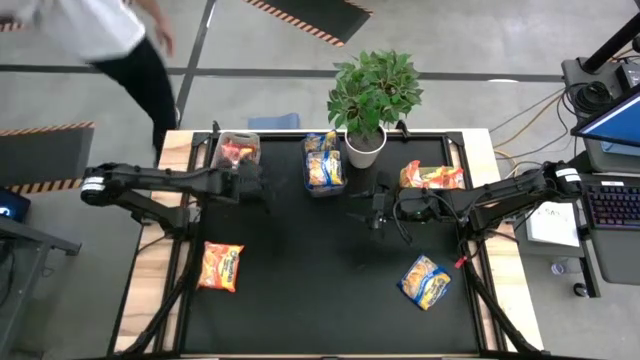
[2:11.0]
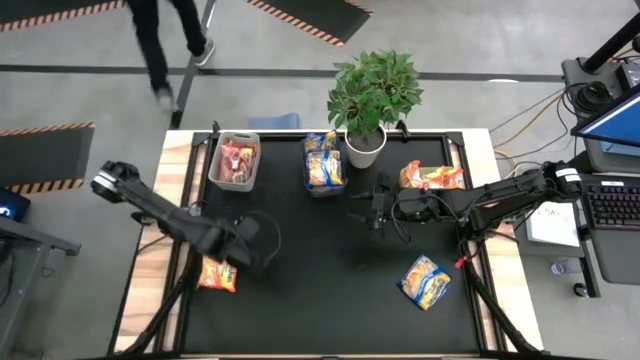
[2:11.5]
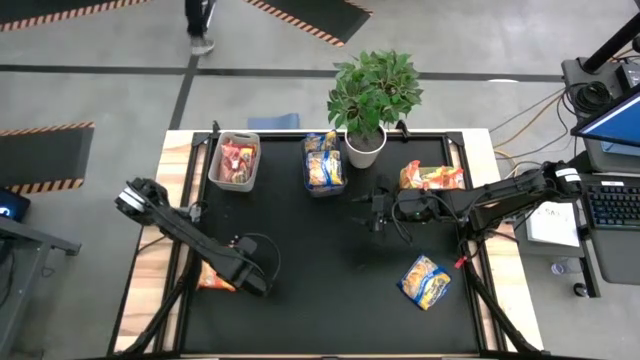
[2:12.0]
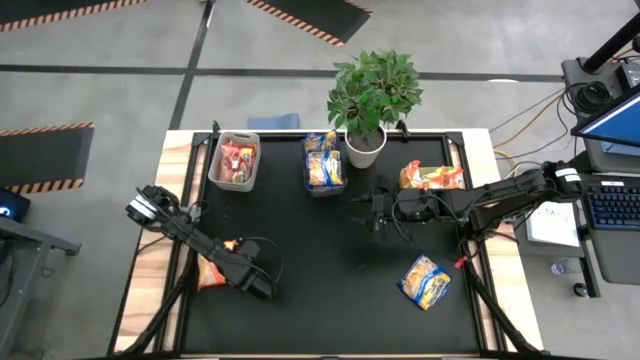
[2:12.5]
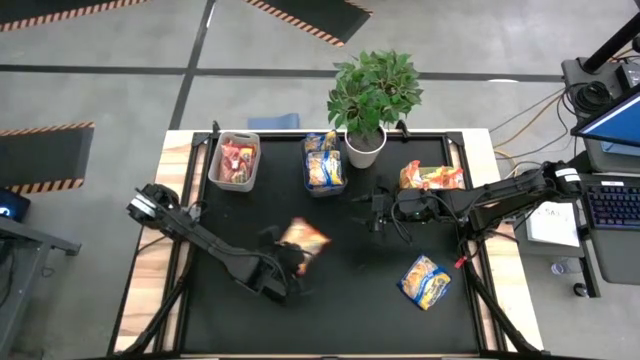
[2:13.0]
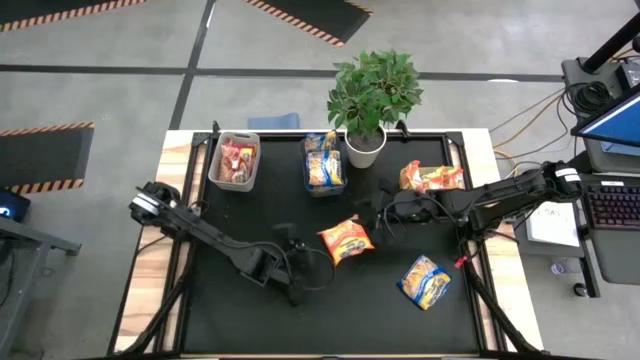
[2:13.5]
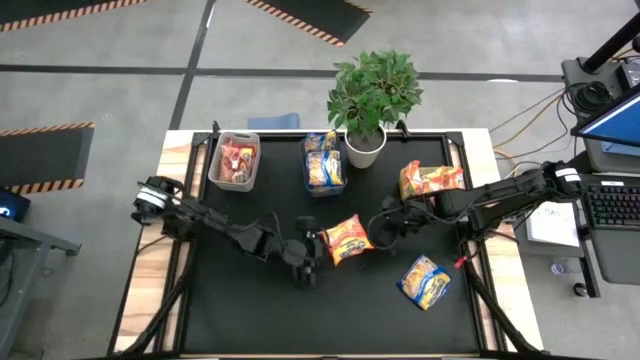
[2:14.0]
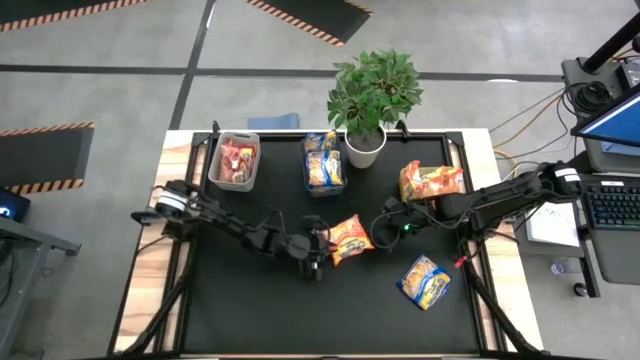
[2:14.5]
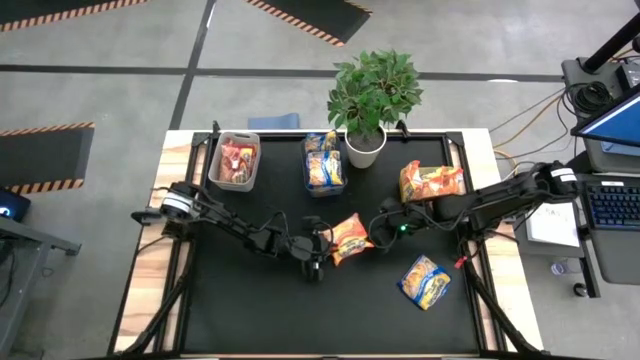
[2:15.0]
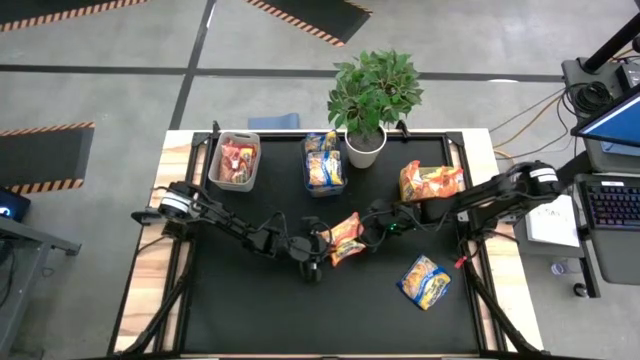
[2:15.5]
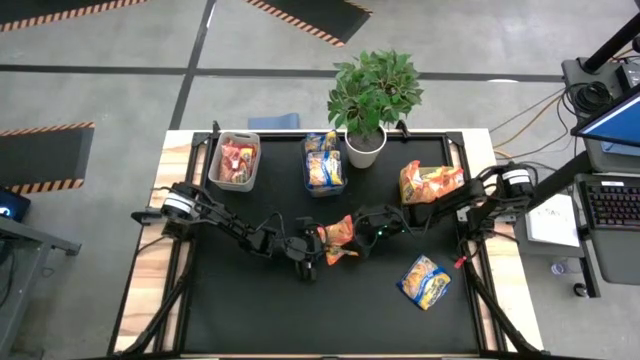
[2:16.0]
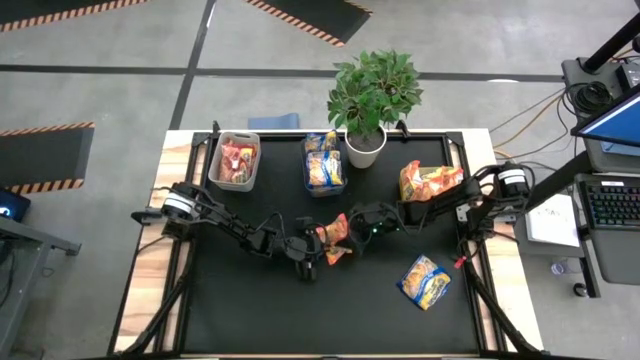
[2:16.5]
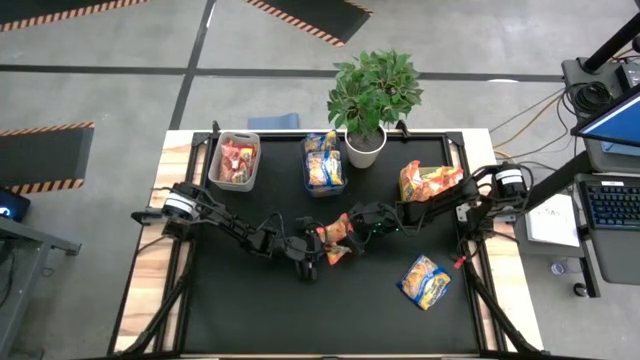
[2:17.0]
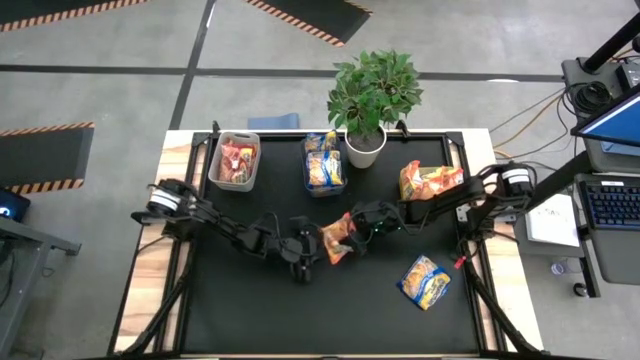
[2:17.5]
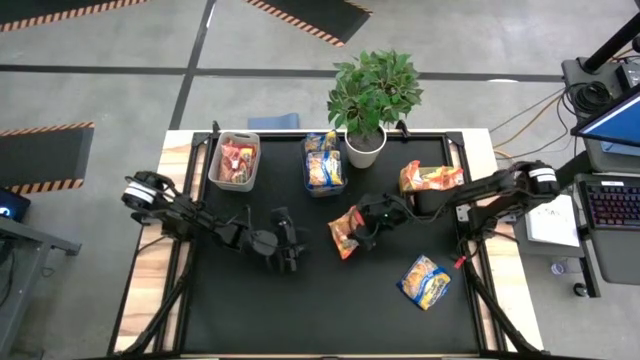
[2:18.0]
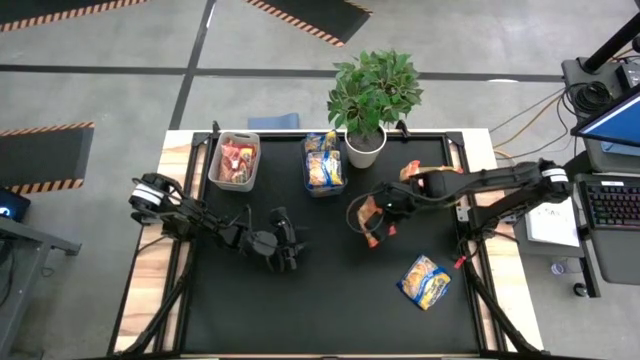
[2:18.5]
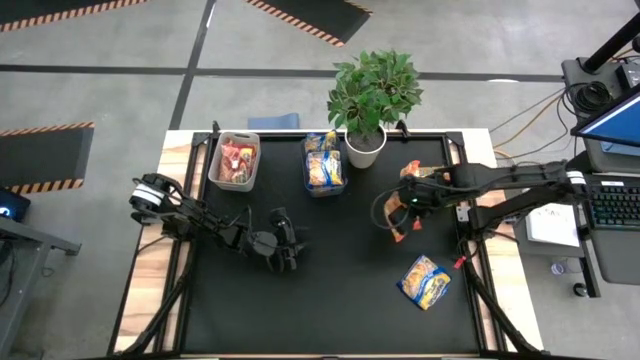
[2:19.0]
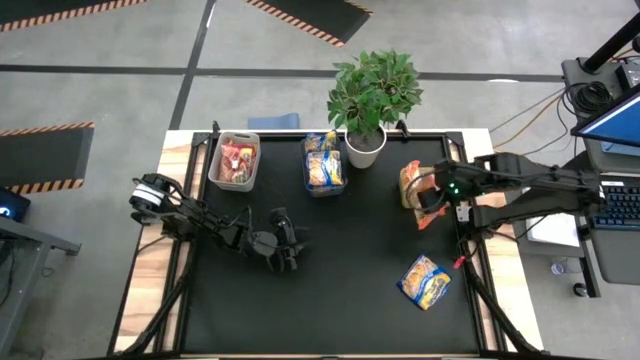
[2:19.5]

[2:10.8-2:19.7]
Task: Sort Maruchan noodles
Put the orange noodle pack into the yellow bin

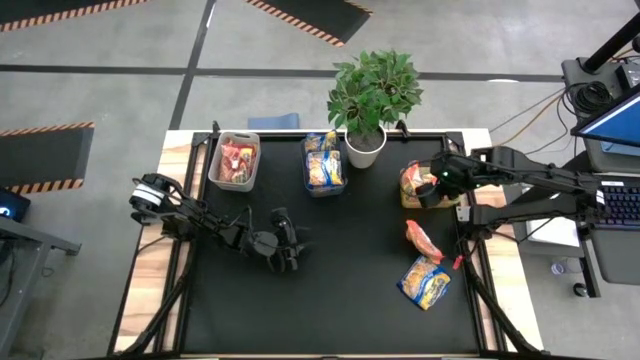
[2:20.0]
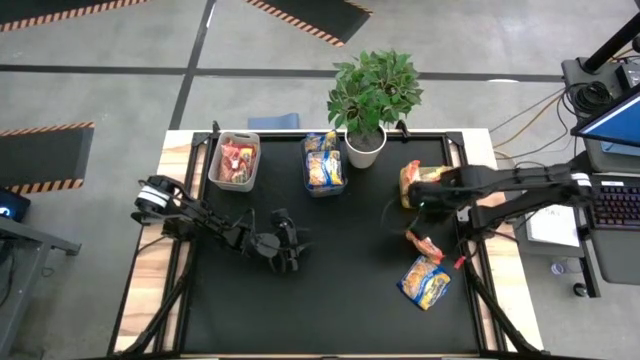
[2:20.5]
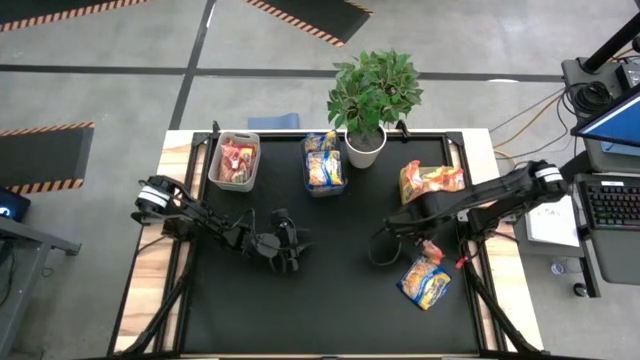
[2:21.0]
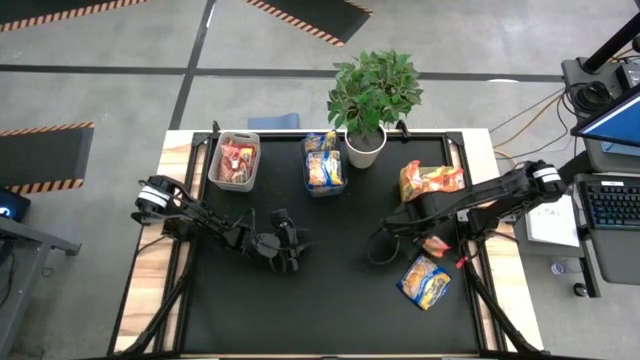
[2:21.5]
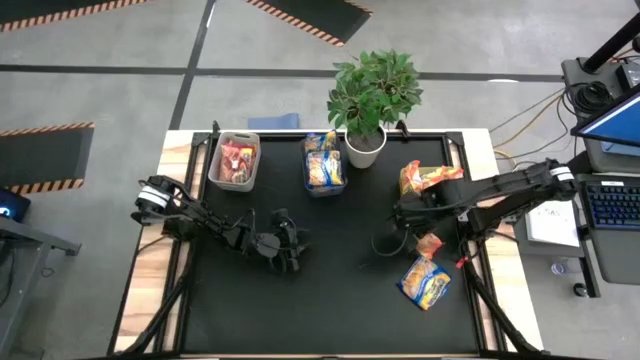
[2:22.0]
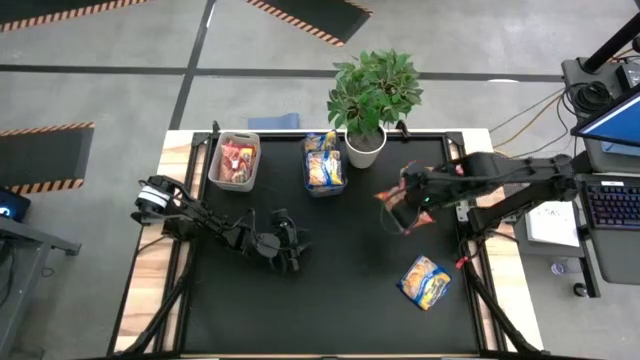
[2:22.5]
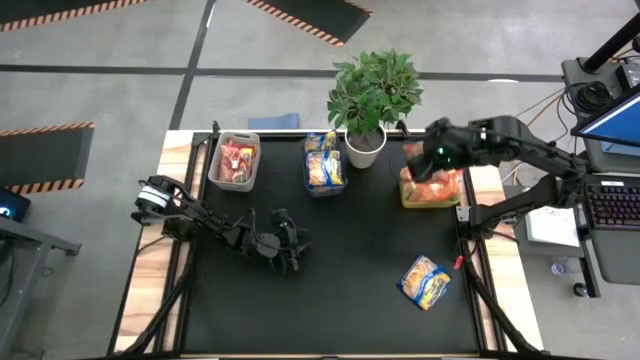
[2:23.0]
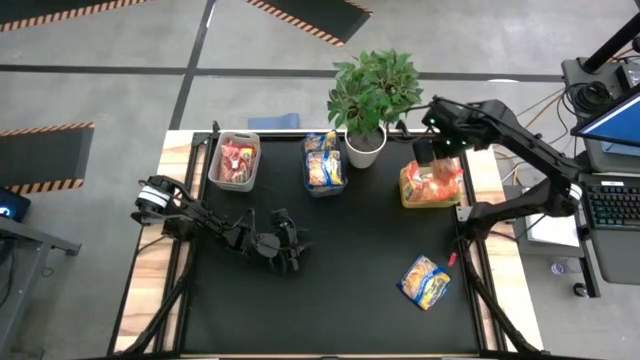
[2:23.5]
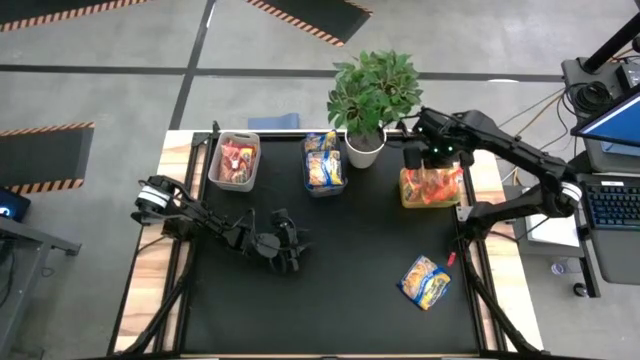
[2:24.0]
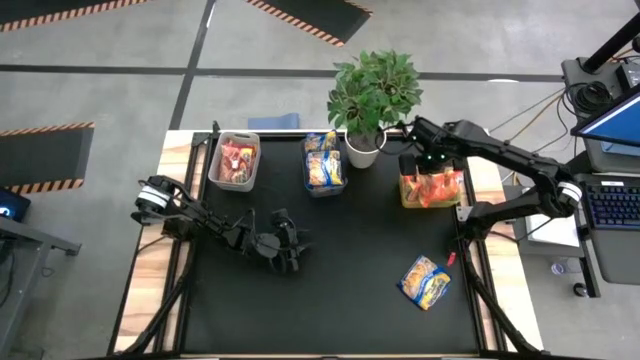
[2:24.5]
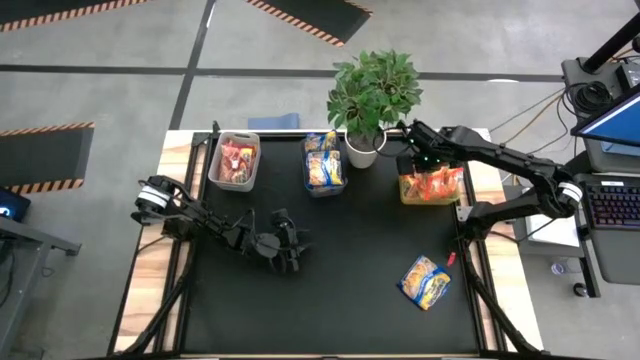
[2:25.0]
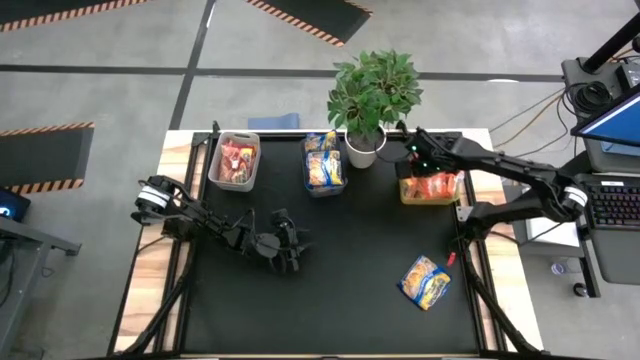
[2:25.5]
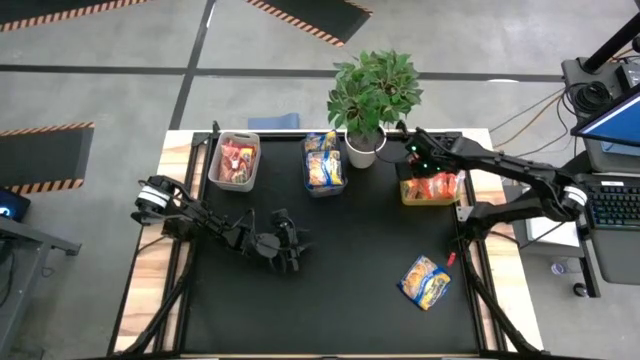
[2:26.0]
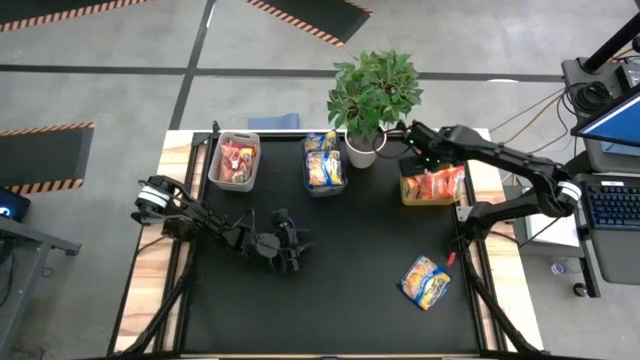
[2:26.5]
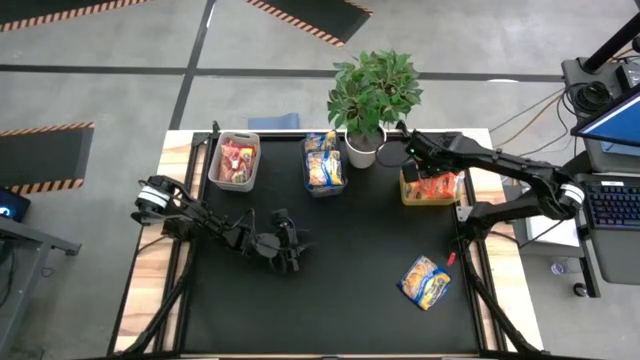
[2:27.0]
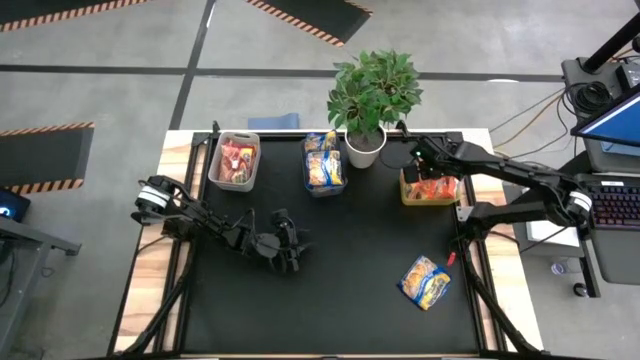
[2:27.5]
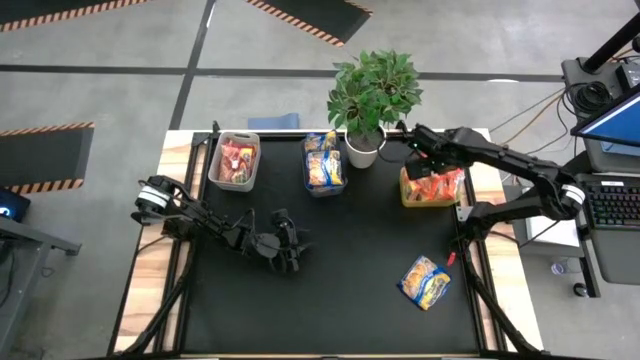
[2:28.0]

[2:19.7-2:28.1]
Put the orange noodle pack into the yellow bin

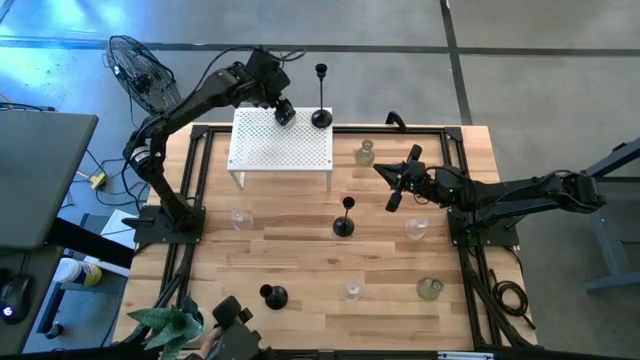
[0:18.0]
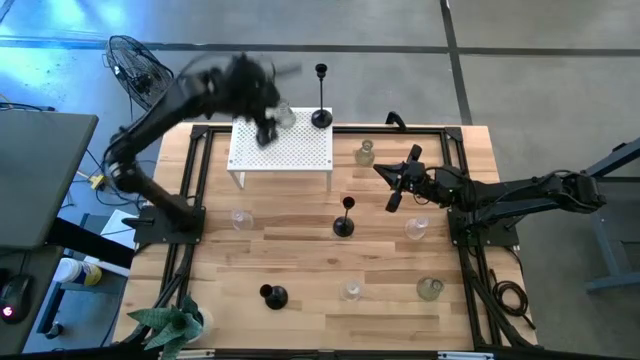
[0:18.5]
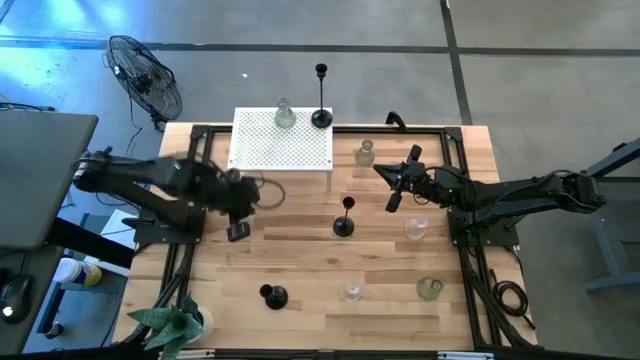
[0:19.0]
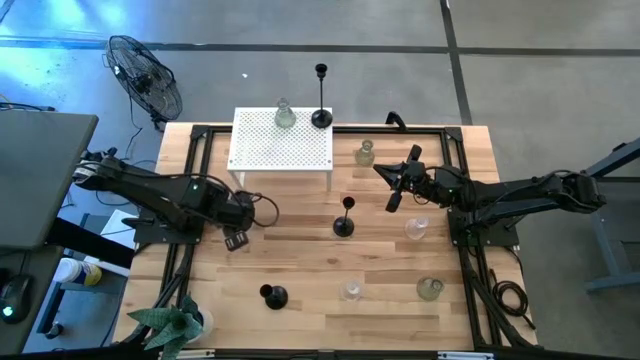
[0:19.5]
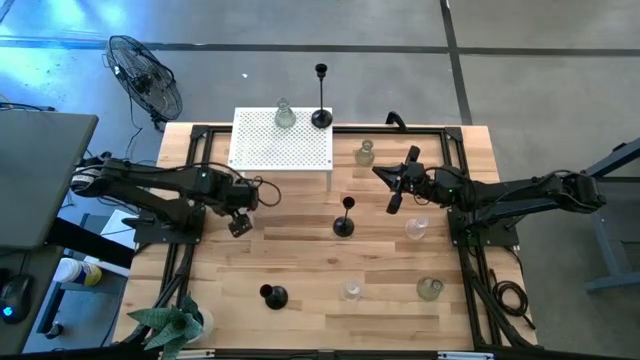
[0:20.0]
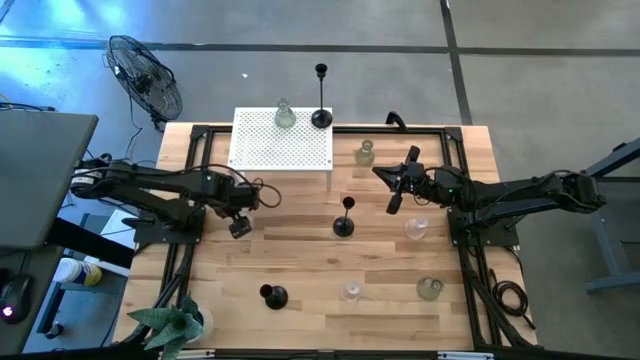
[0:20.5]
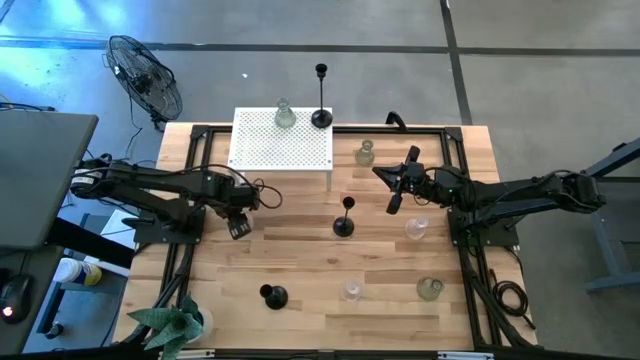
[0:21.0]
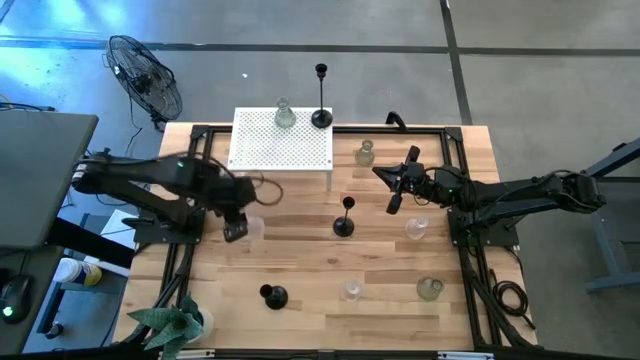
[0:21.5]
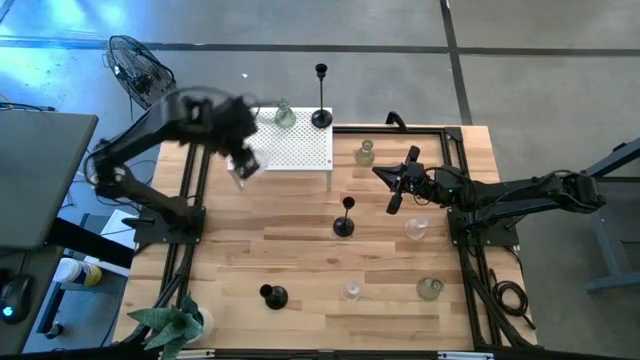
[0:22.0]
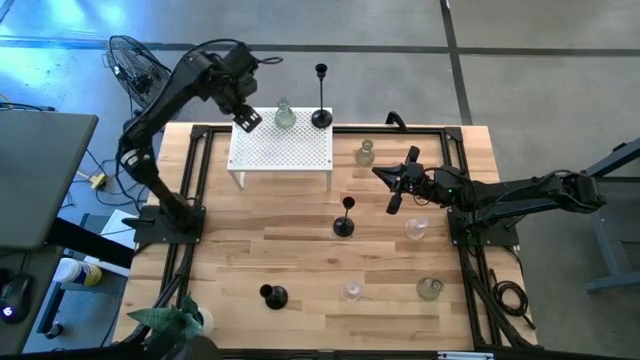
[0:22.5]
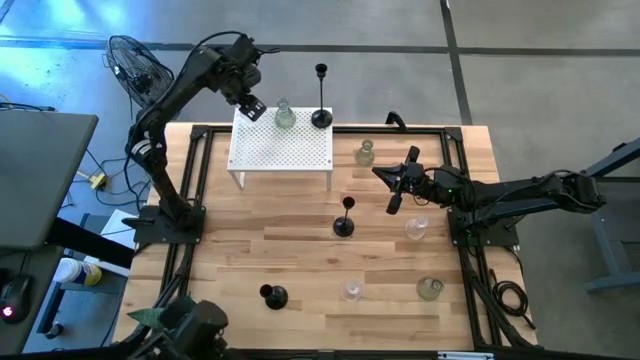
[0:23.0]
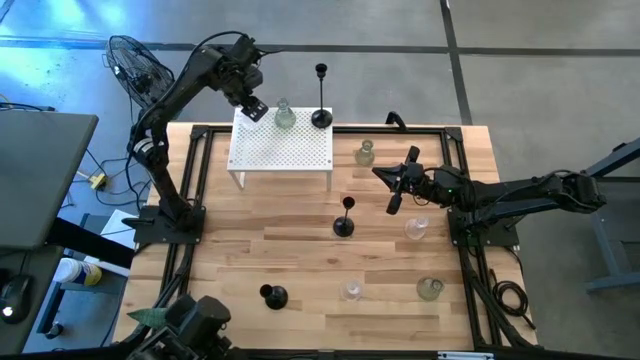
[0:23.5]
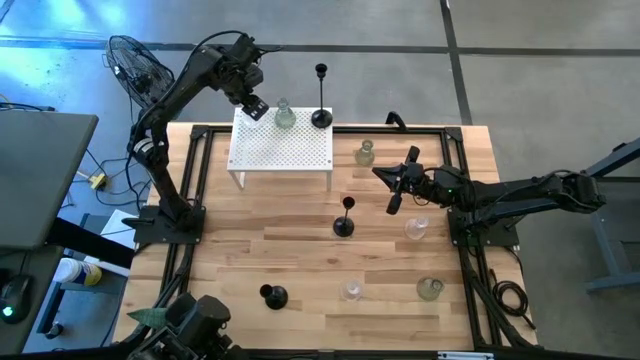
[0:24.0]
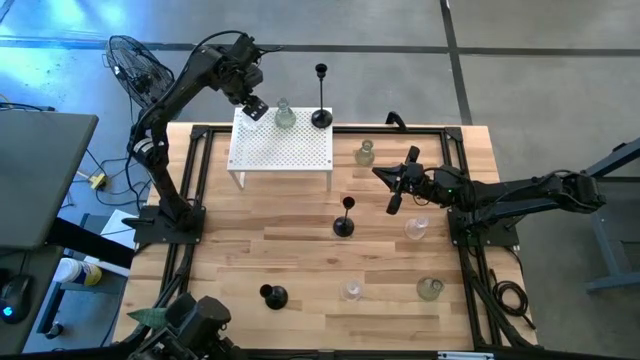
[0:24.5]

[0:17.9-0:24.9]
Task: Pick & Place candle stick holders
Put the top left transparent candle holder on the shelf
